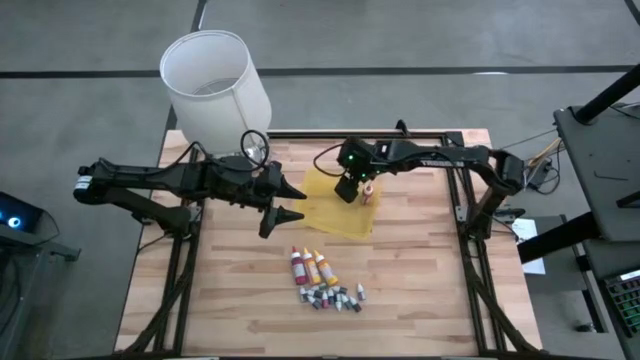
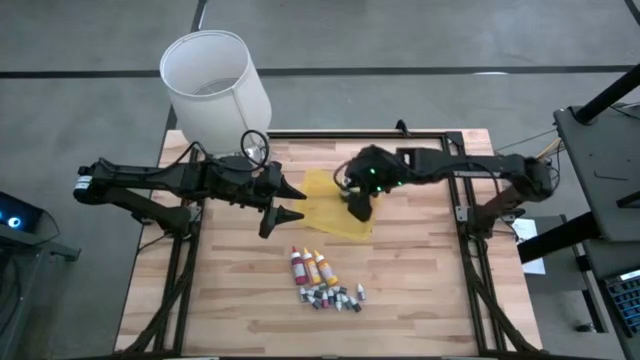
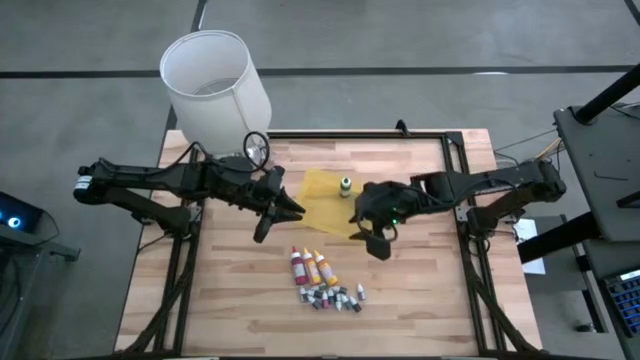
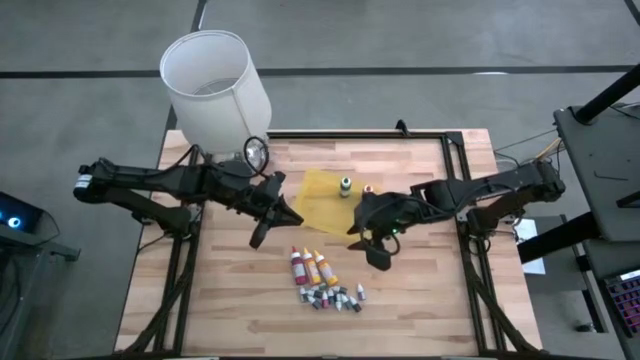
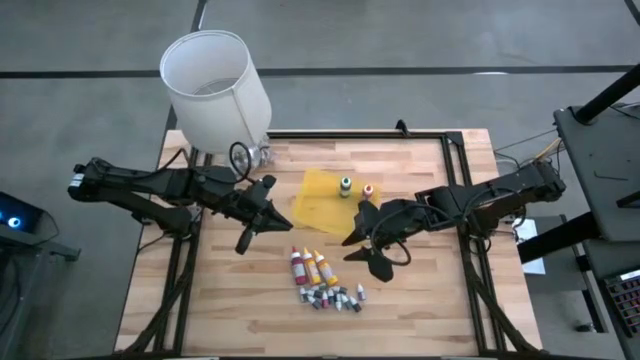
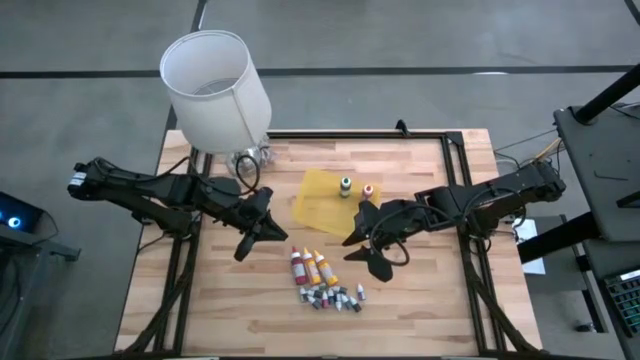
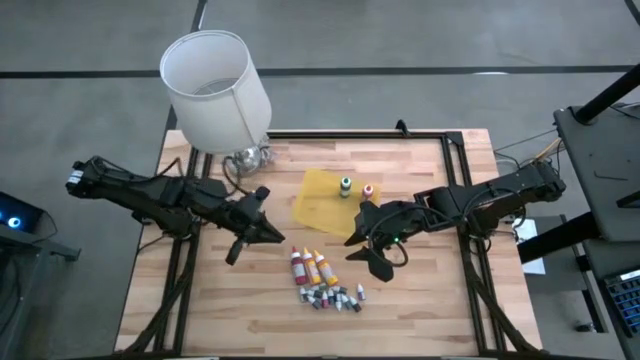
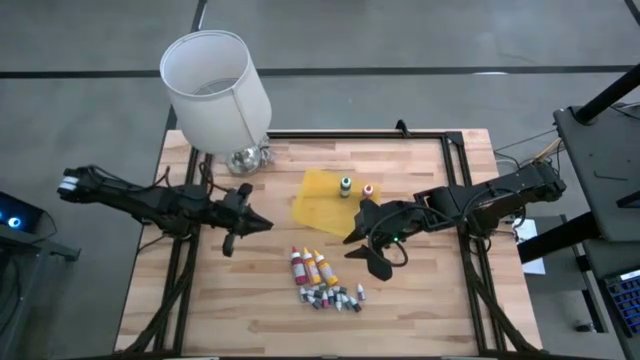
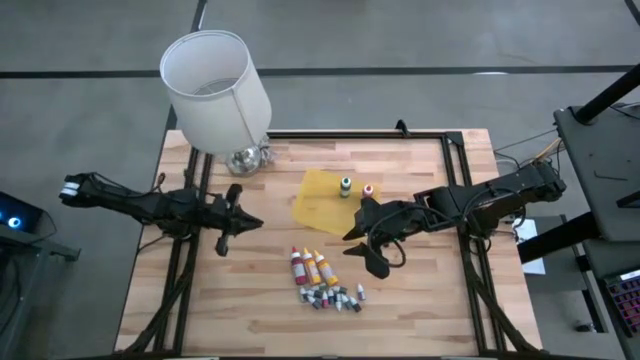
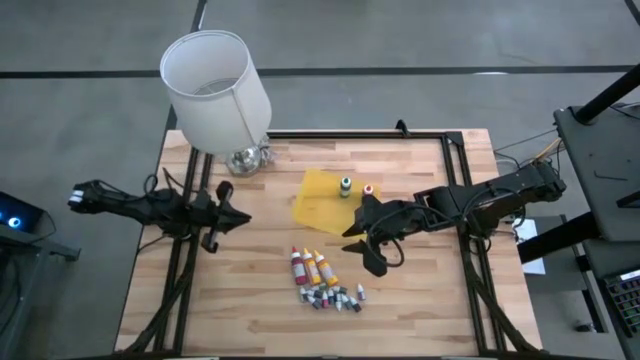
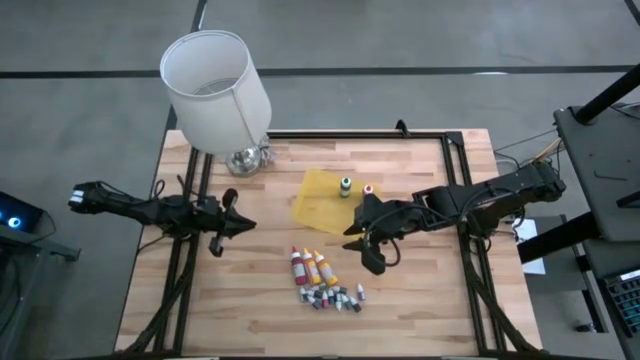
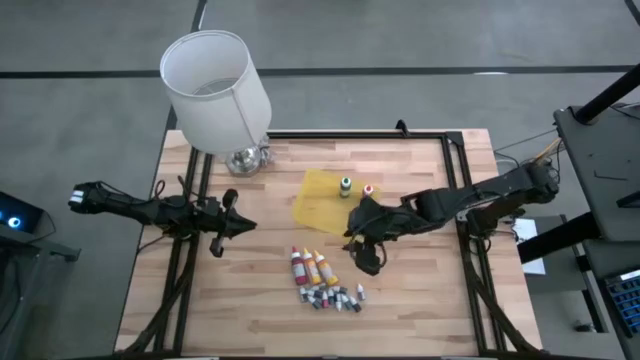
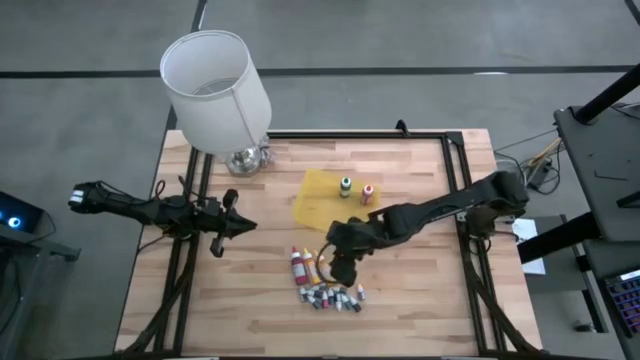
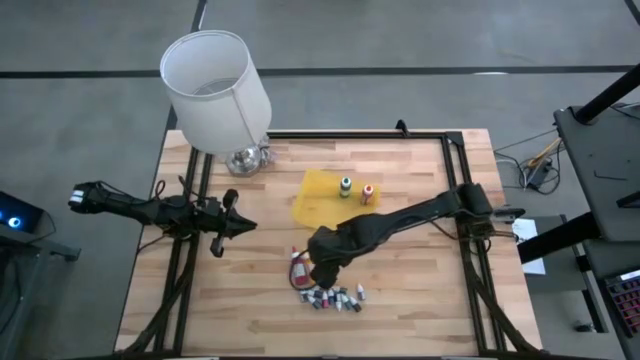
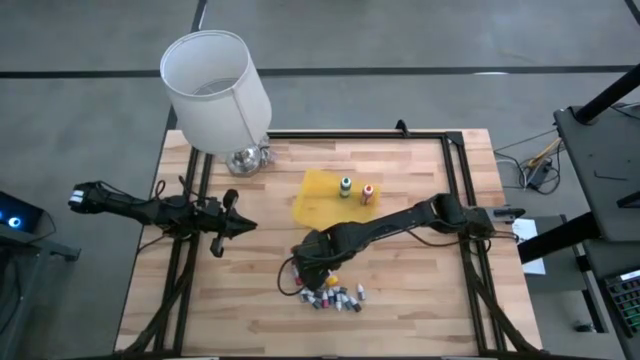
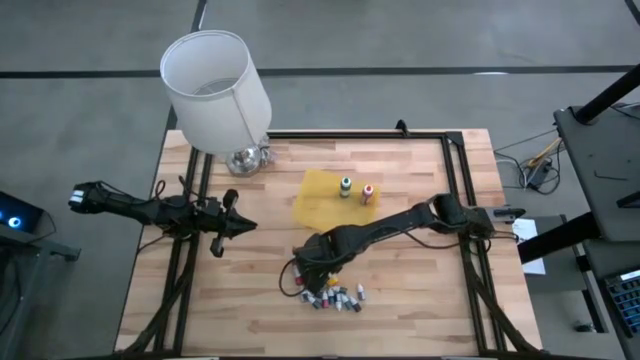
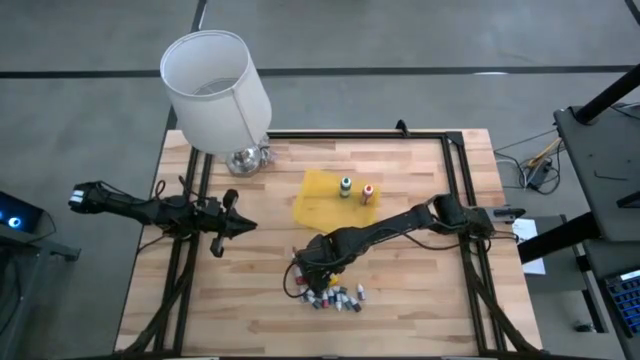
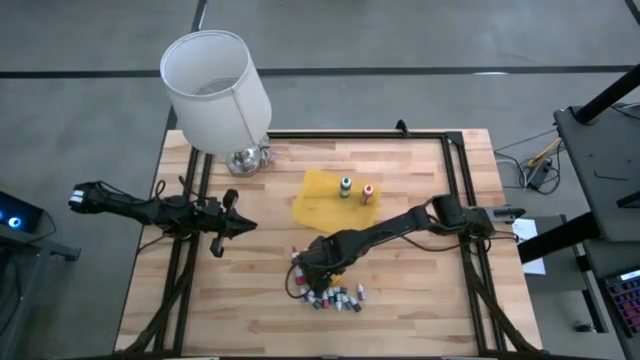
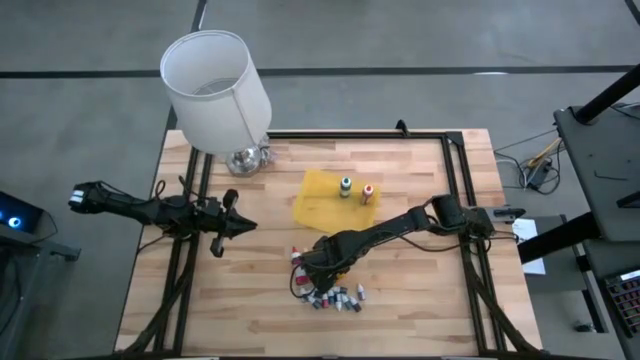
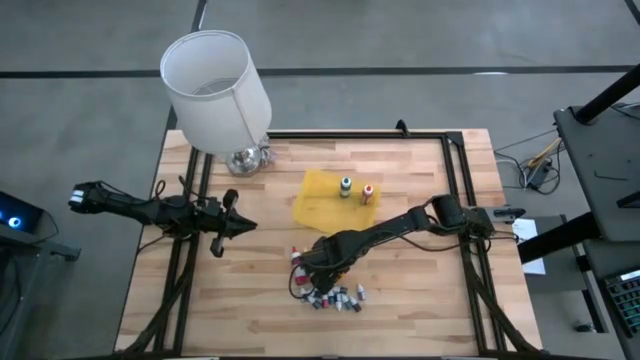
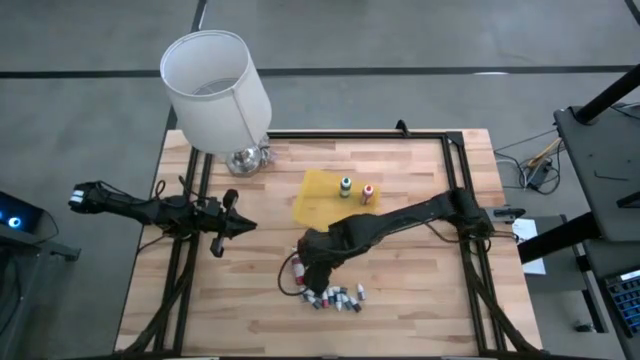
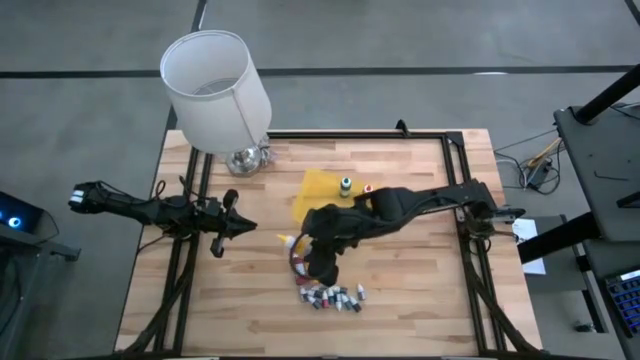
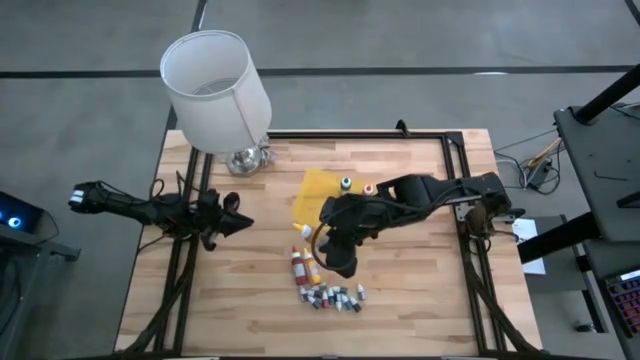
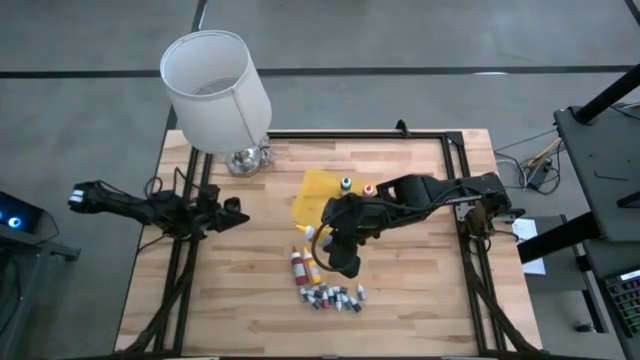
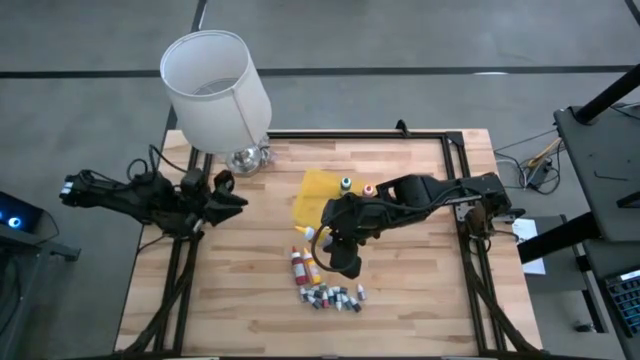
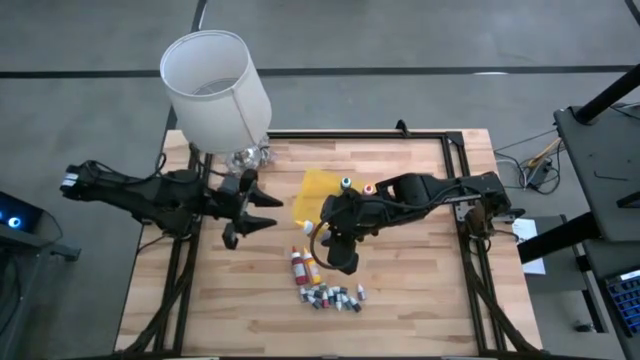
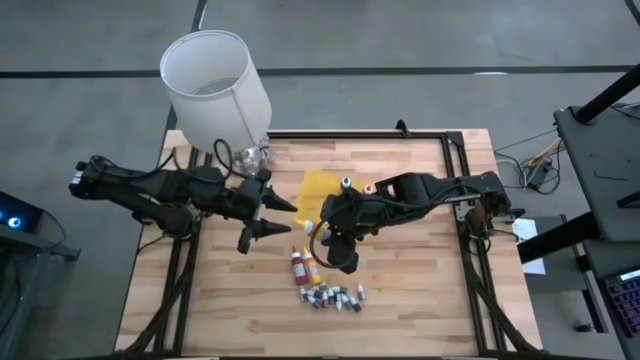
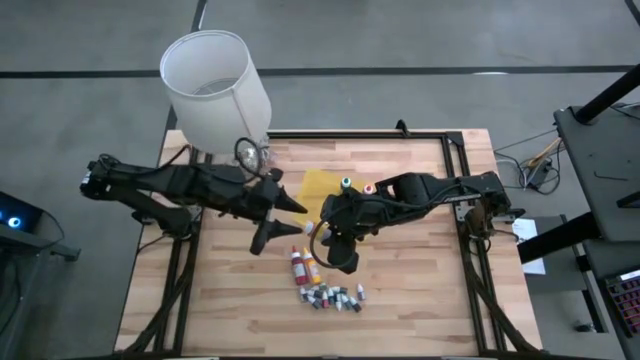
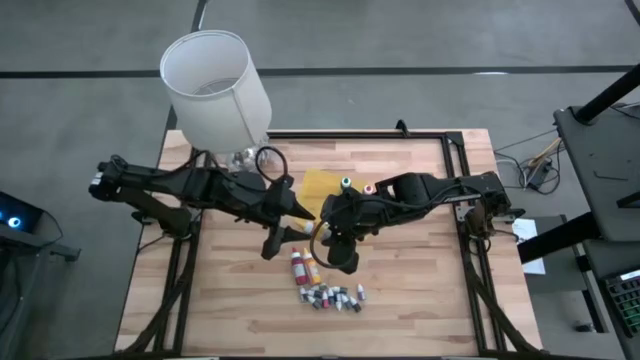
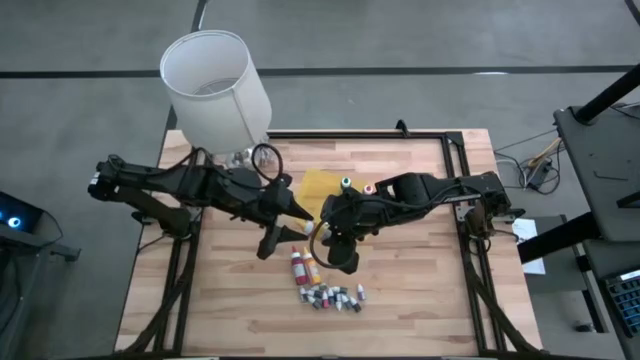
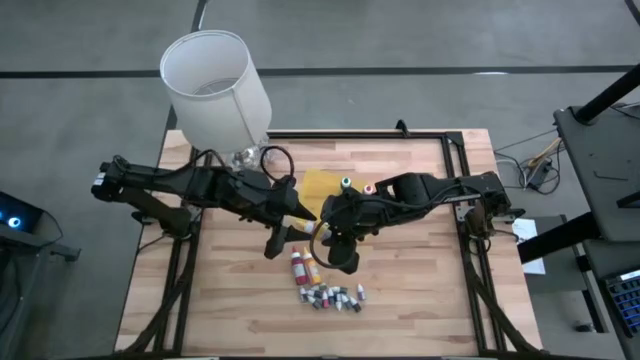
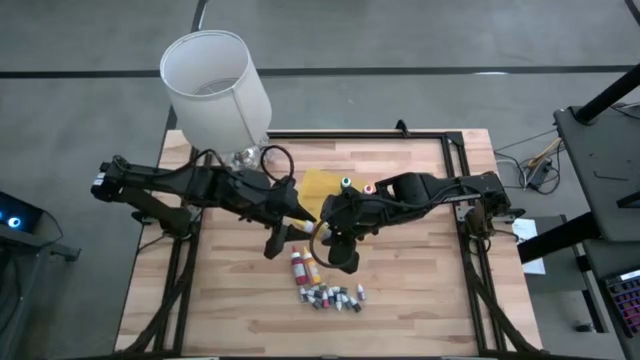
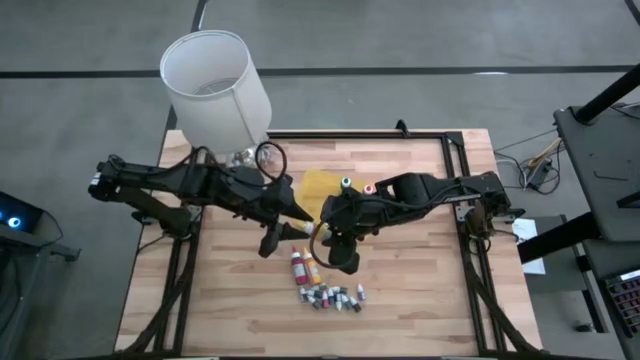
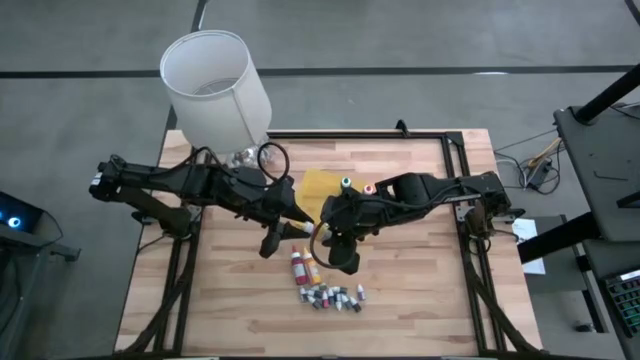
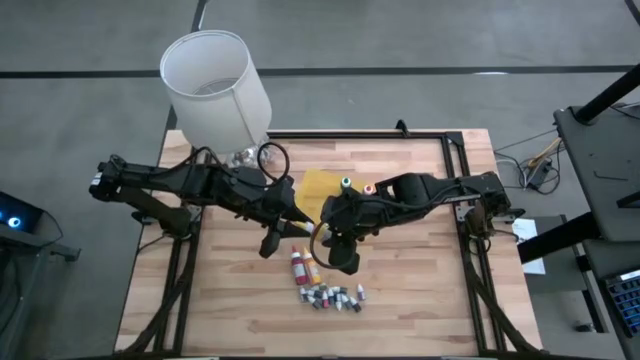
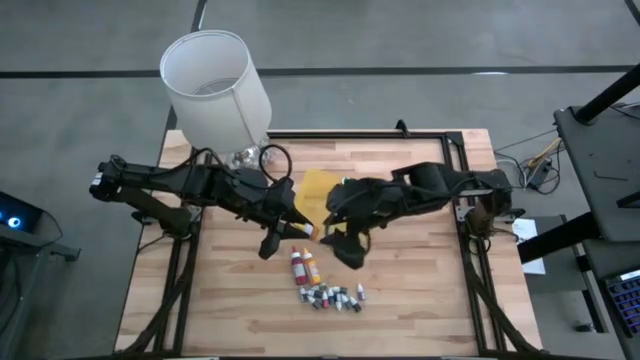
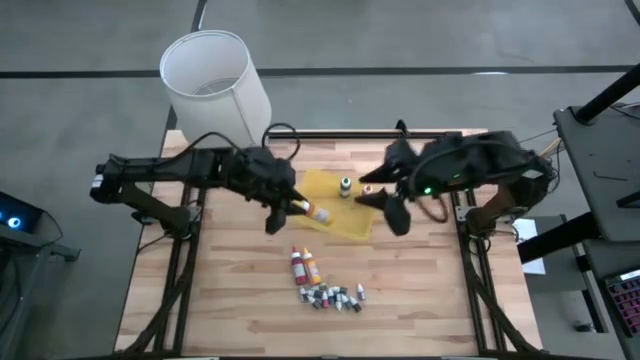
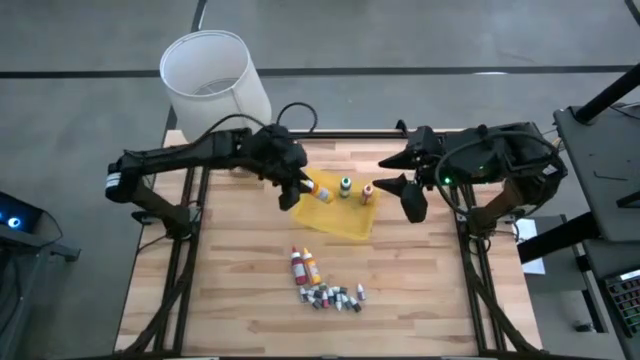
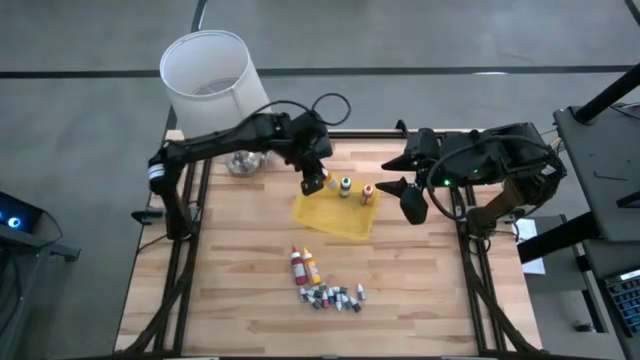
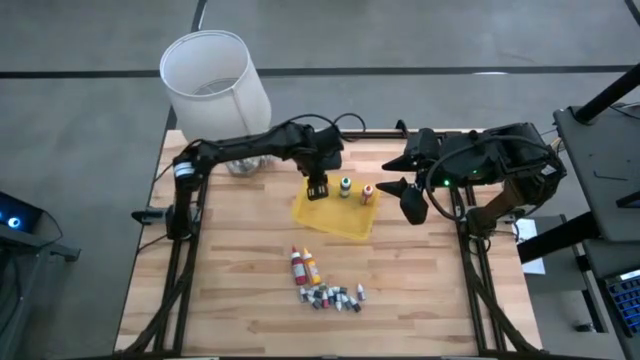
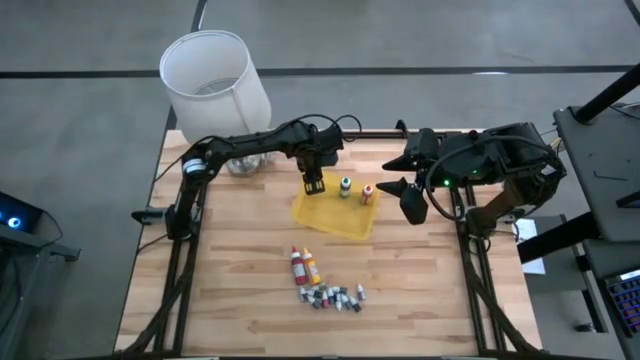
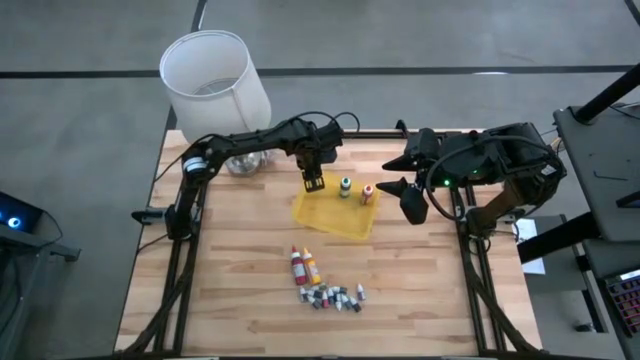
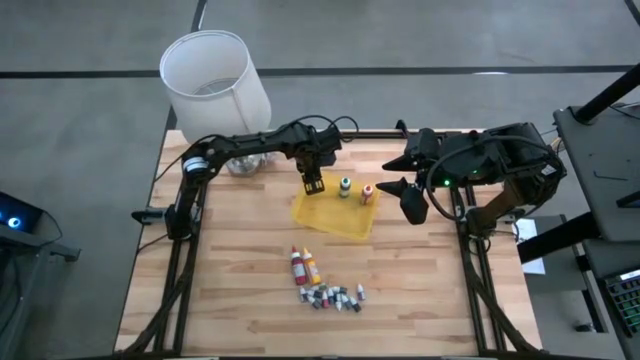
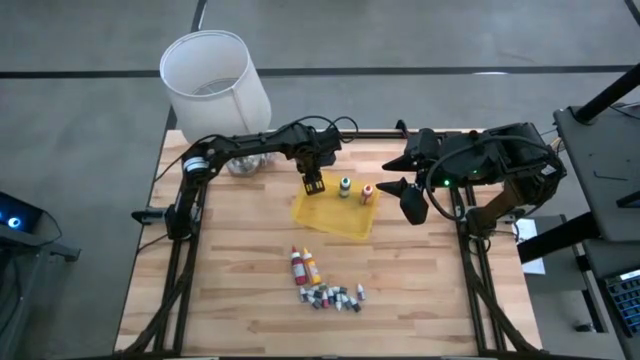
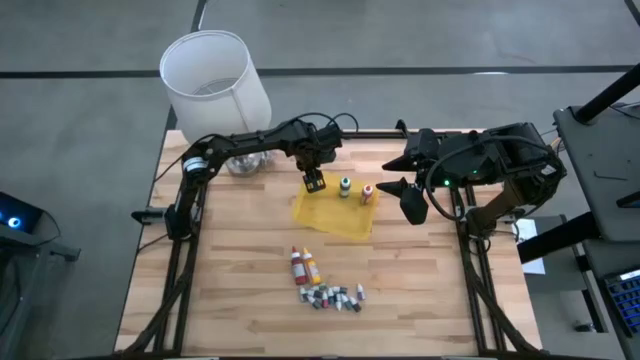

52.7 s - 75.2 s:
Task: Pick & Place food coloring
Put the large yellow food coloring bottle into the yellow bin
